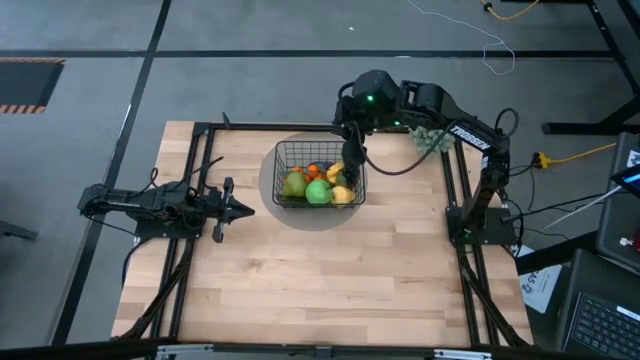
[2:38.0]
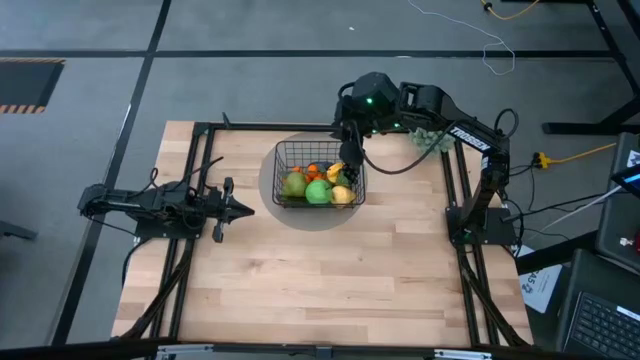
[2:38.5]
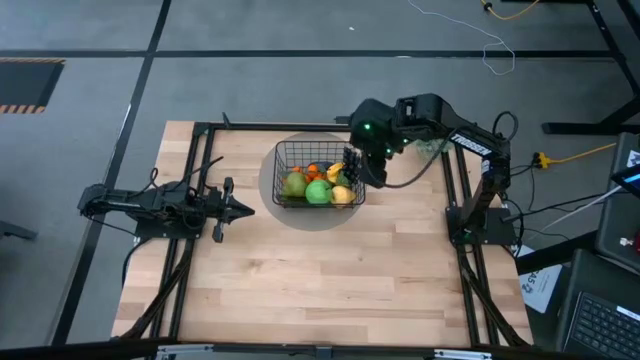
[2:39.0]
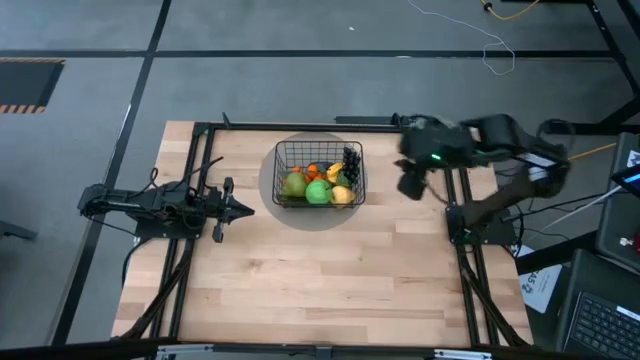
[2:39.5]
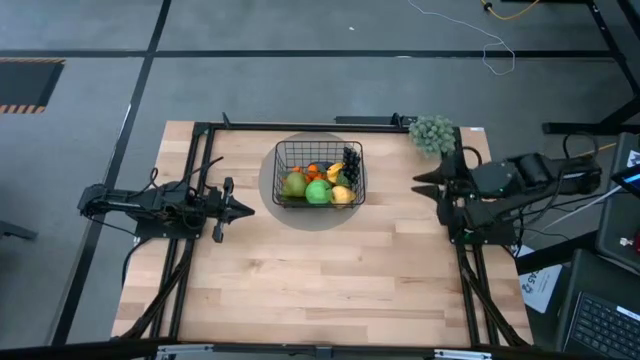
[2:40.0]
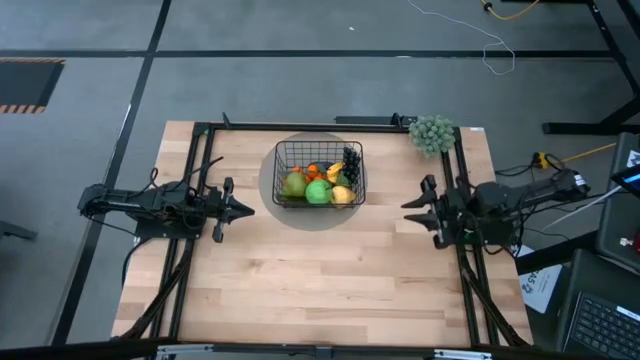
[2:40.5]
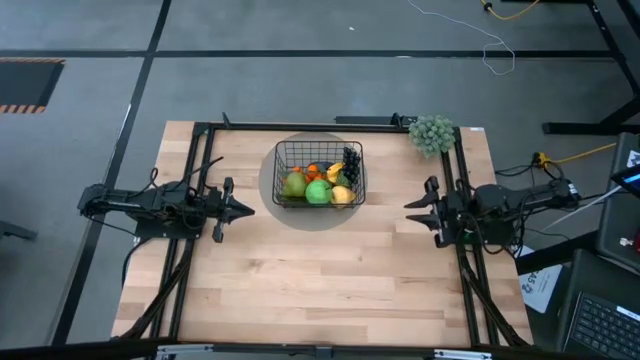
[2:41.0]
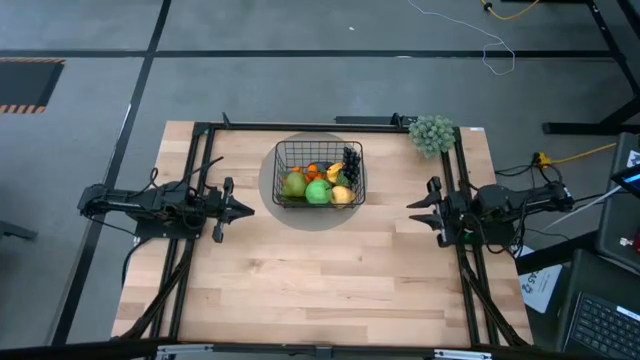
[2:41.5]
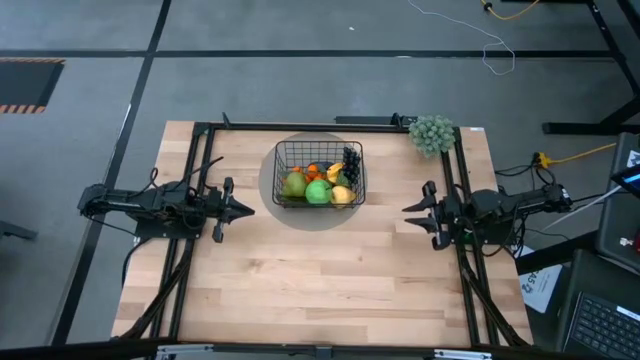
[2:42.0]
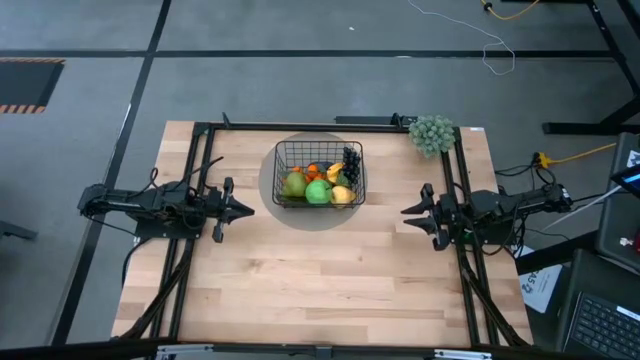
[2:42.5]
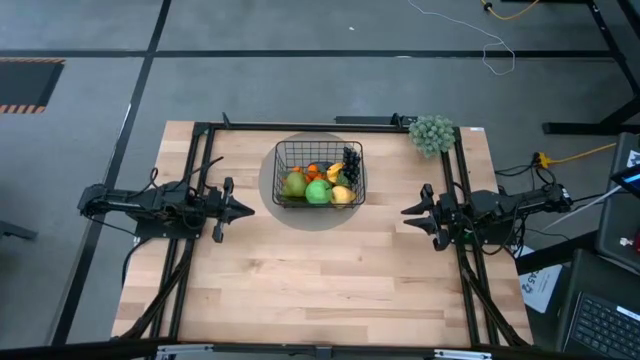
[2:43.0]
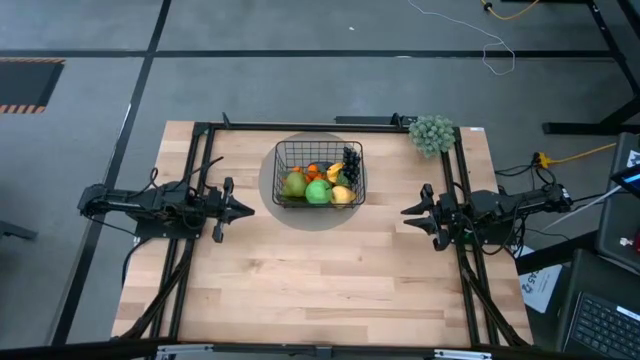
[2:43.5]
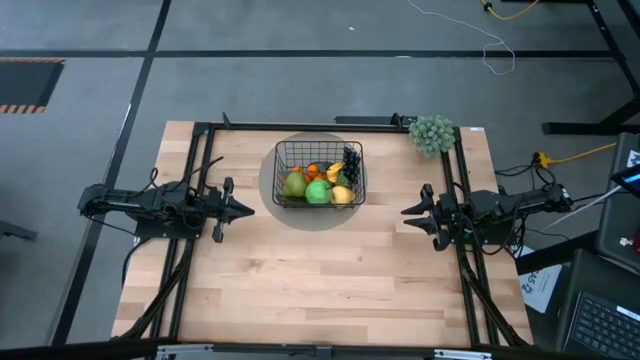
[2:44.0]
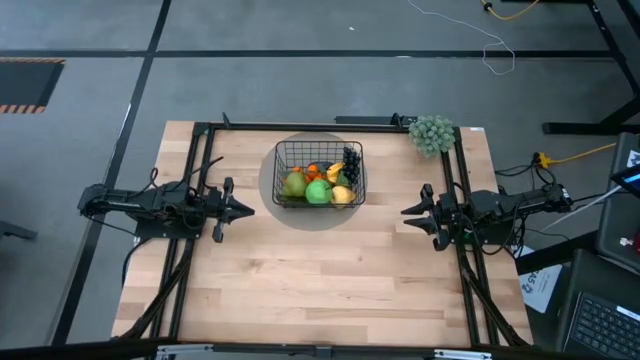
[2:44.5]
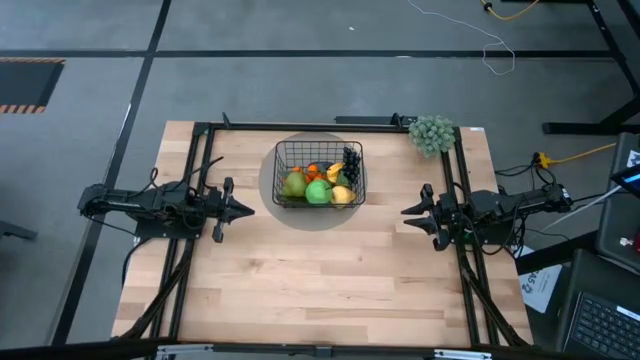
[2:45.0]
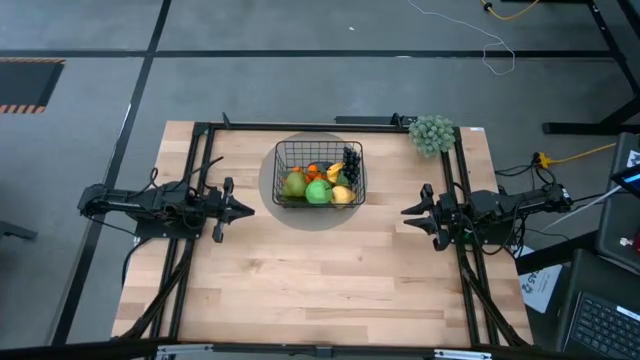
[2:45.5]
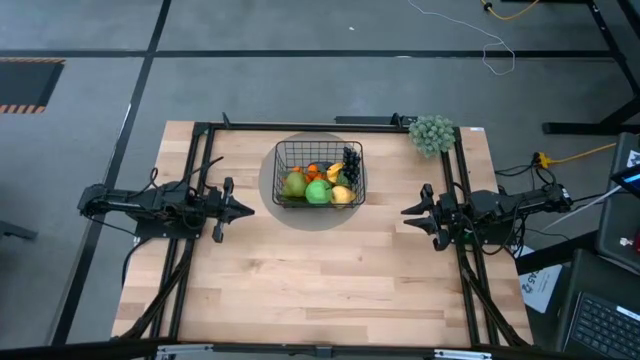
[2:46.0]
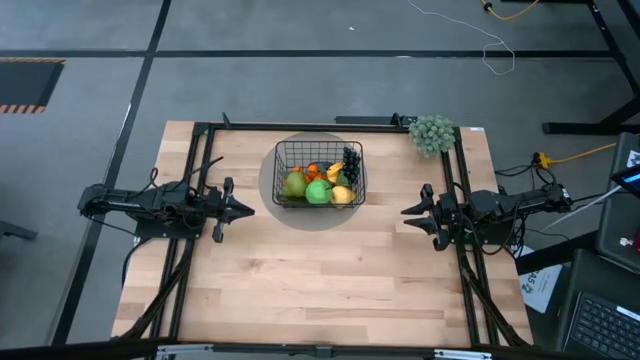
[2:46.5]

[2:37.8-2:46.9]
Task: Build produce basket
Return to Home Position

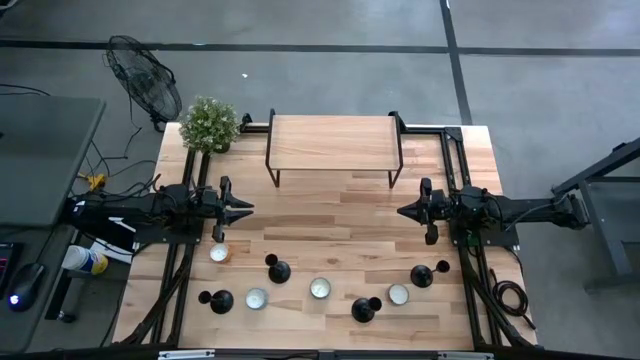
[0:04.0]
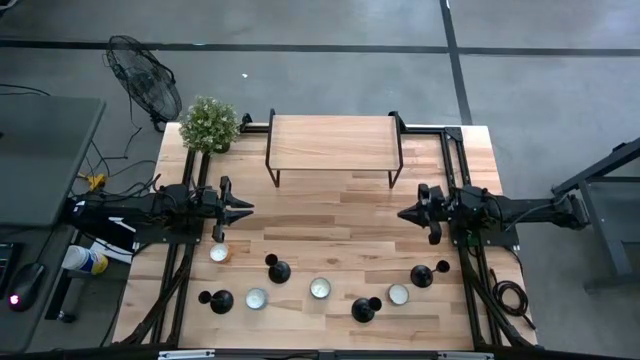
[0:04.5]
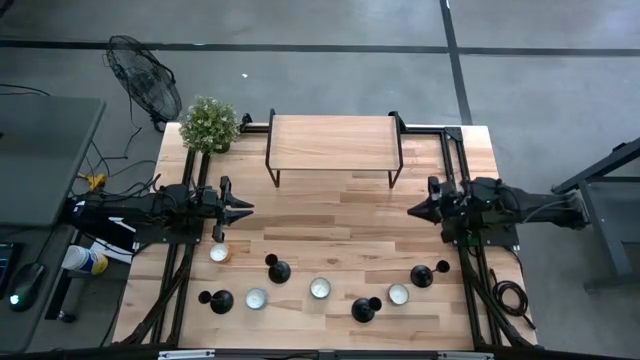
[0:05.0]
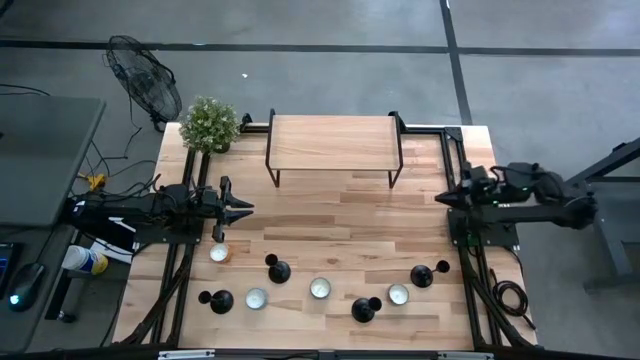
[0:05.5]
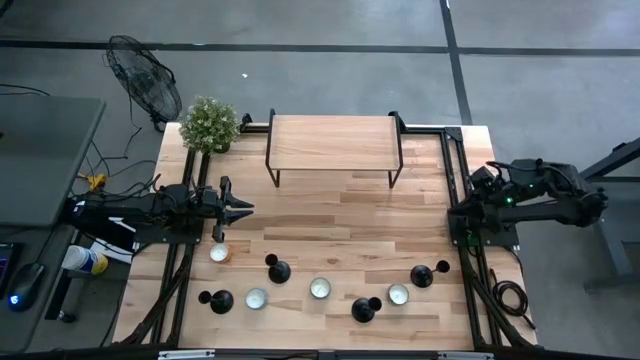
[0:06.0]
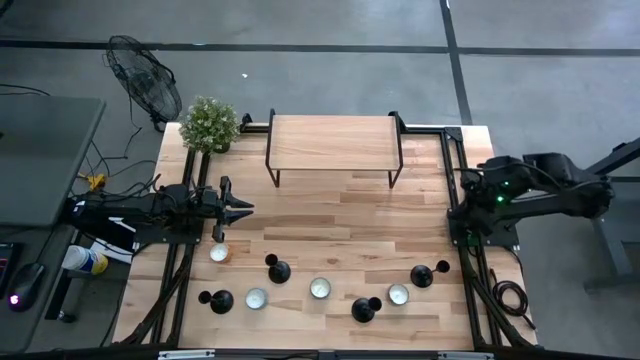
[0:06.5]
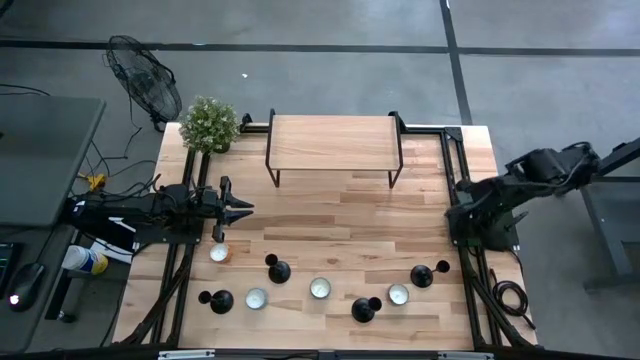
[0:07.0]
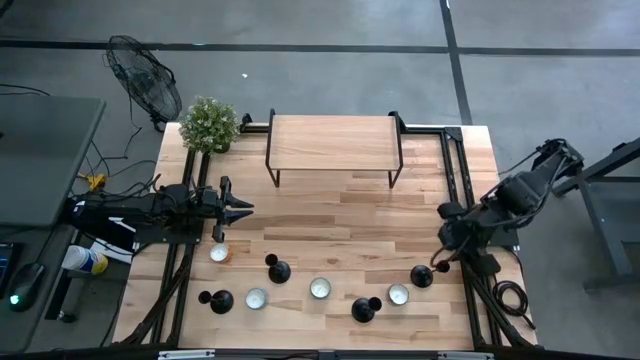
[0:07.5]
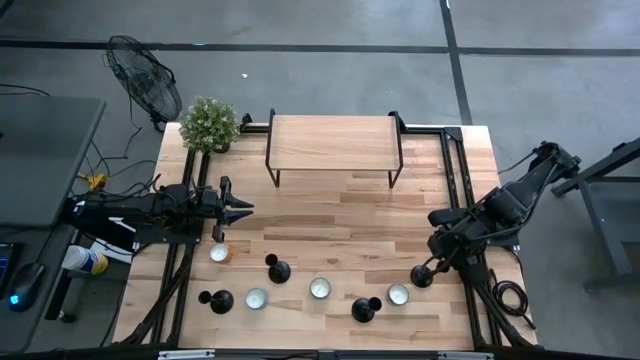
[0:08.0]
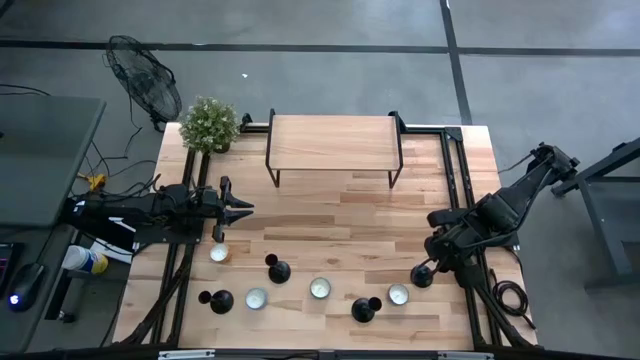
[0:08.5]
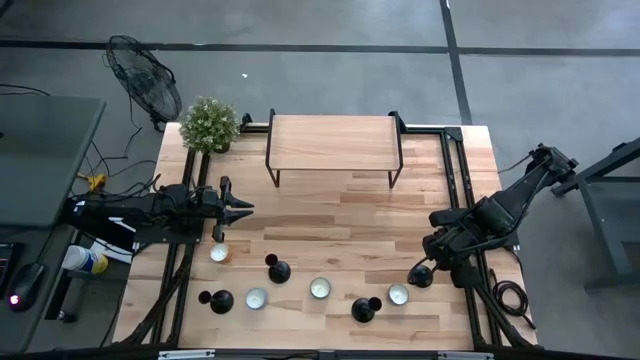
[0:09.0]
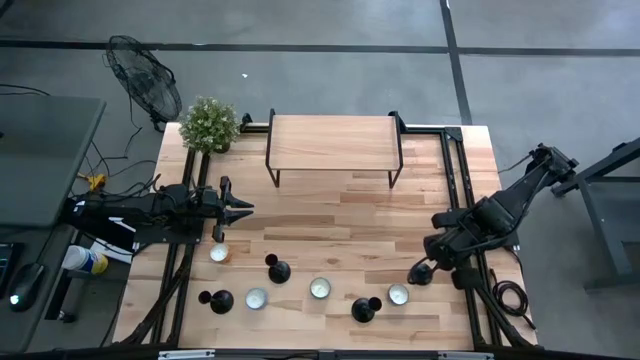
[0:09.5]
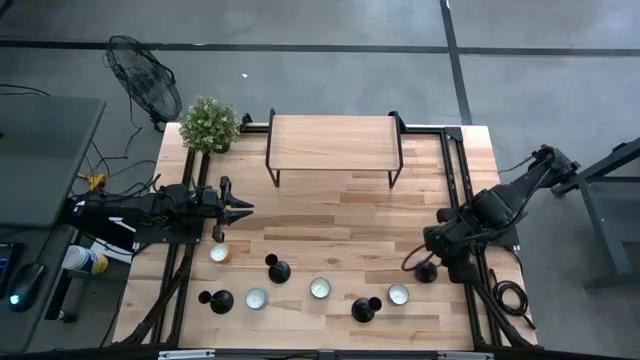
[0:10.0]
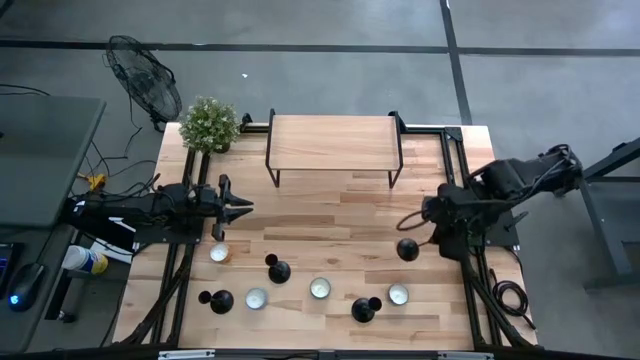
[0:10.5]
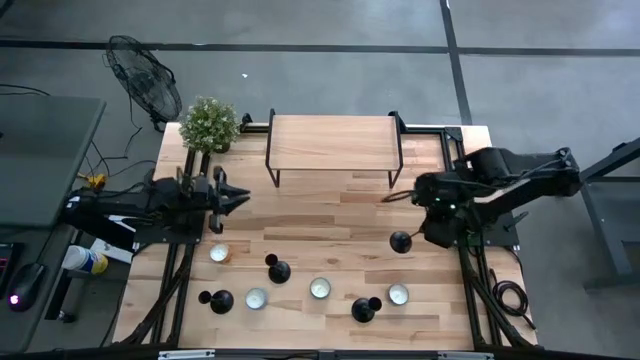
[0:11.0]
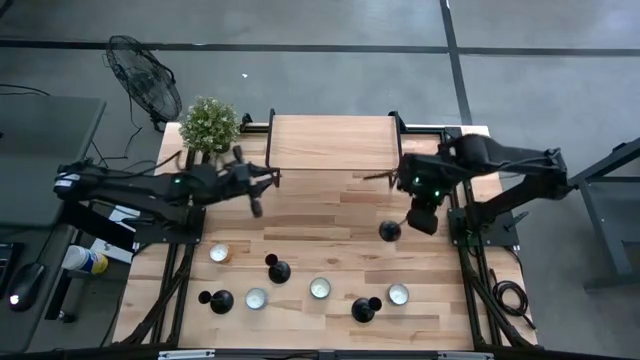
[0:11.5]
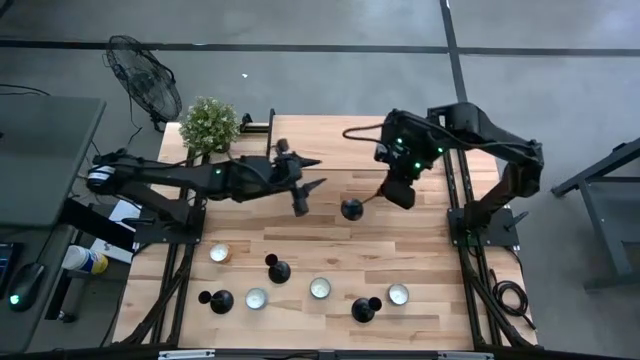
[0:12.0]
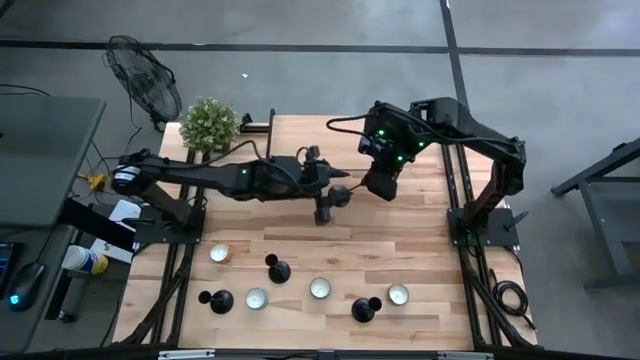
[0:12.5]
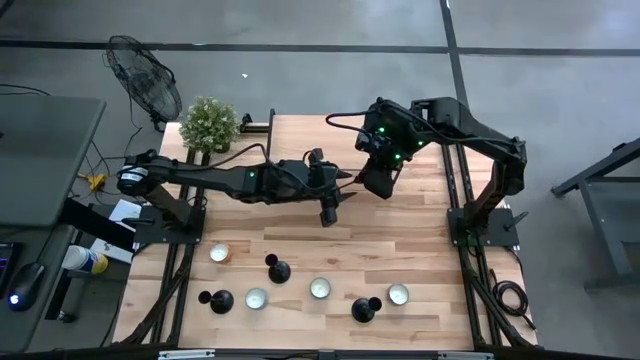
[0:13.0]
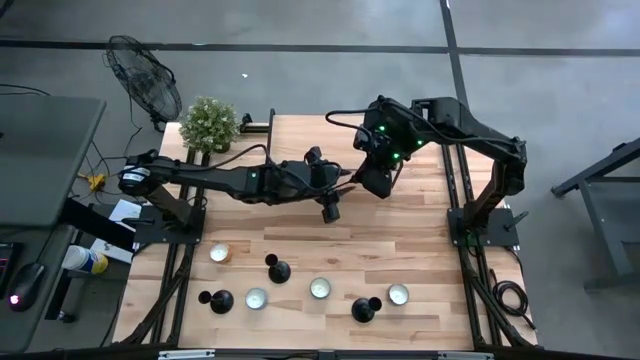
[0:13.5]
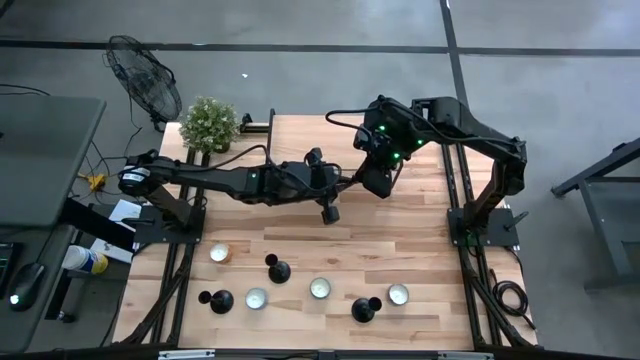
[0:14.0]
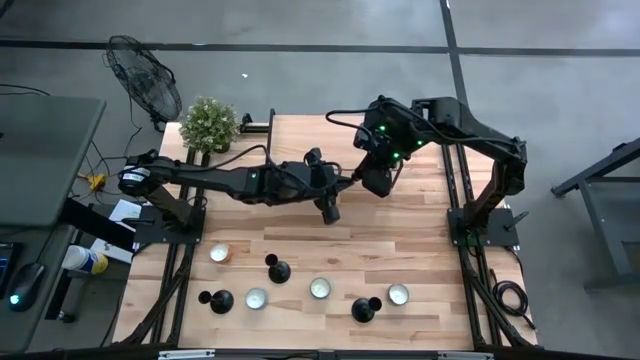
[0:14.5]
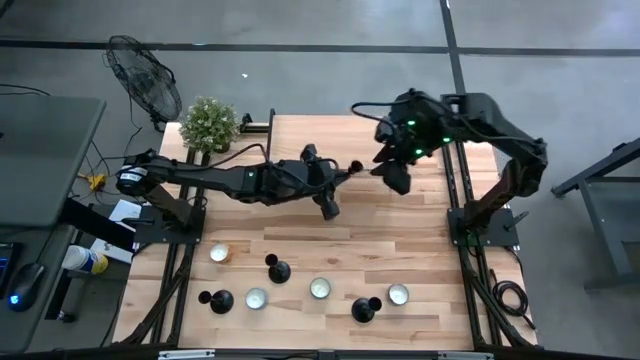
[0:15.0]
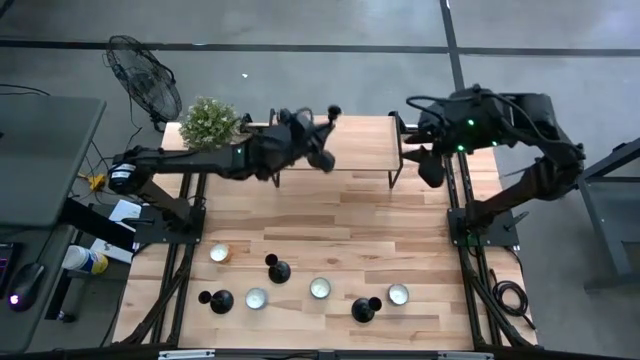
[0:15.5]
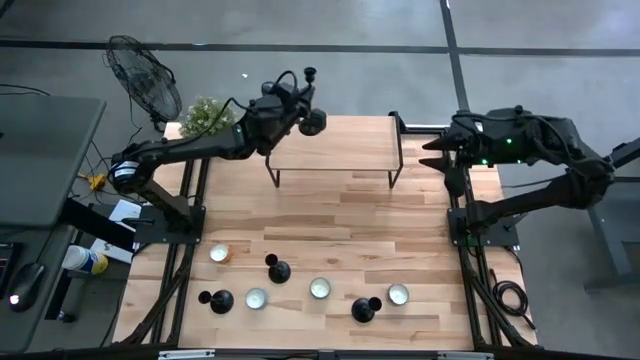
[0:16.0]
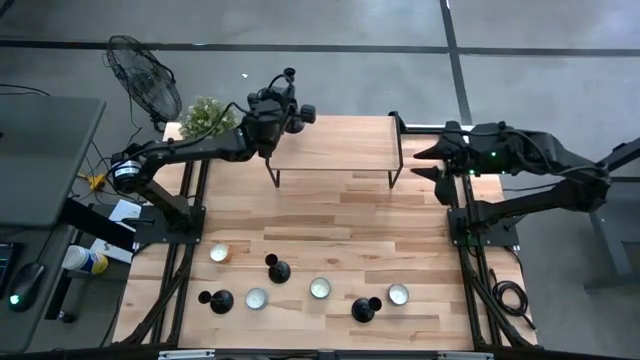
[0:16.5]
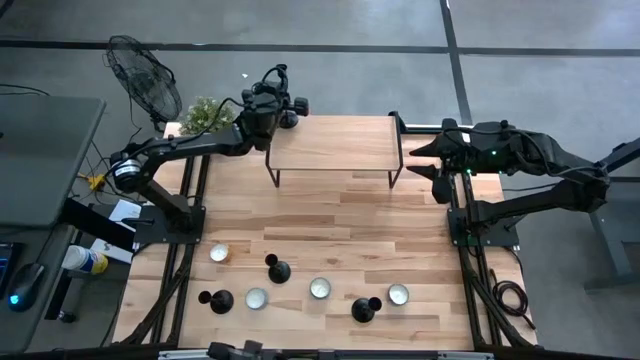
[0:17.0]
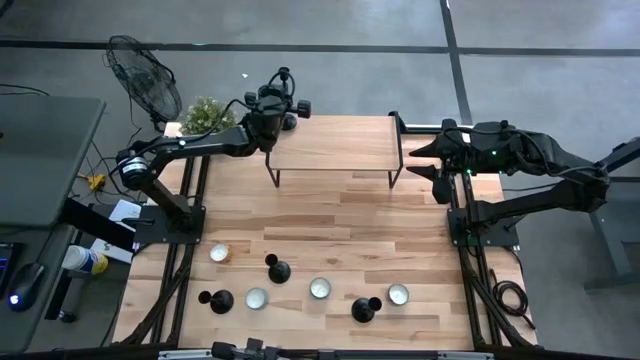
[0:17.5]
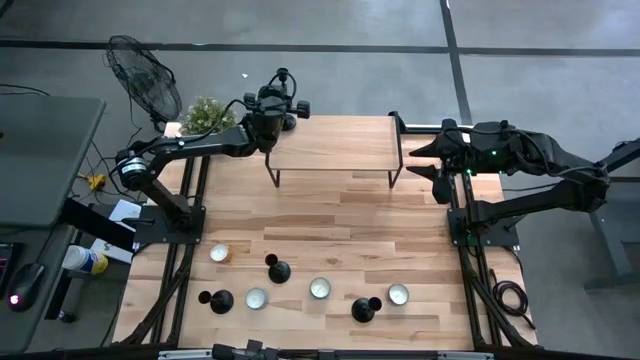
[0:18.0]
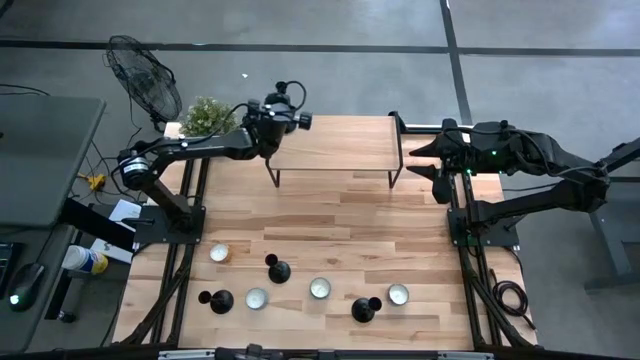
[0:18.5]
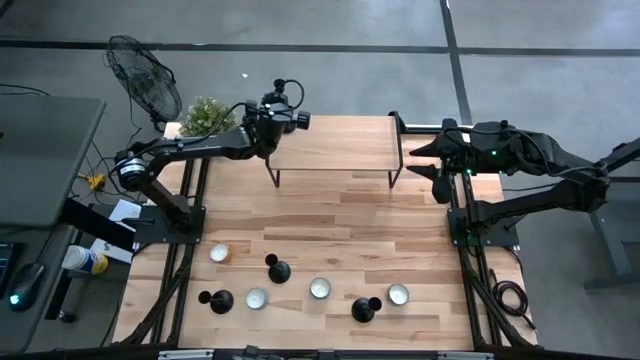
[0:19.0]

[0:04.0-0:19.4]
Task: Pick & Place candle stick holders
Put the black candle holder on the shelf
